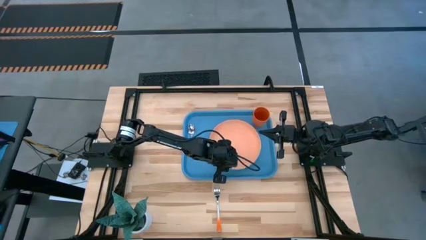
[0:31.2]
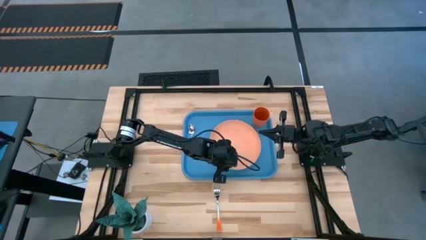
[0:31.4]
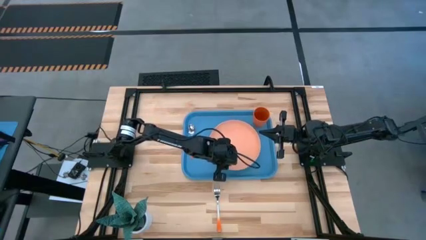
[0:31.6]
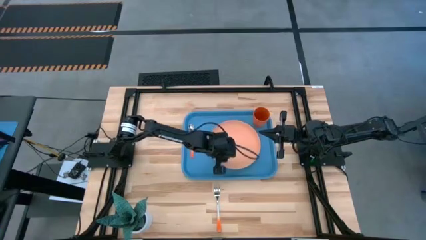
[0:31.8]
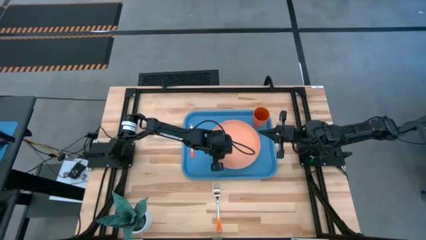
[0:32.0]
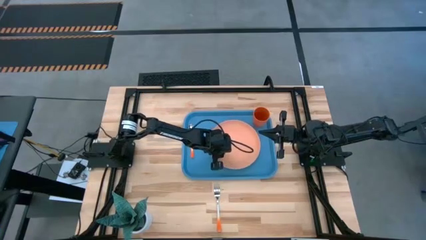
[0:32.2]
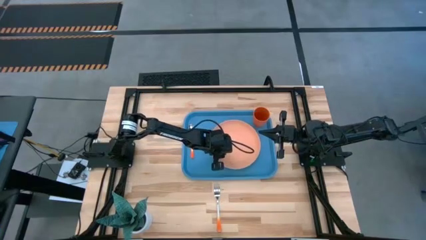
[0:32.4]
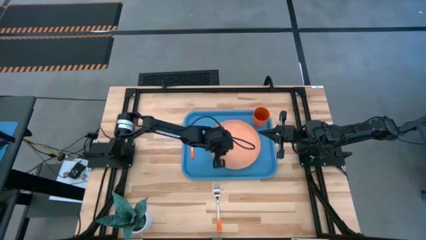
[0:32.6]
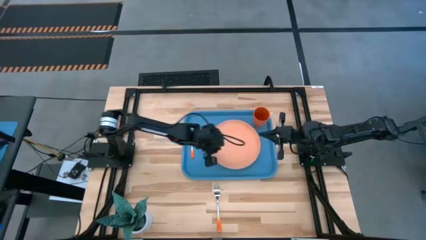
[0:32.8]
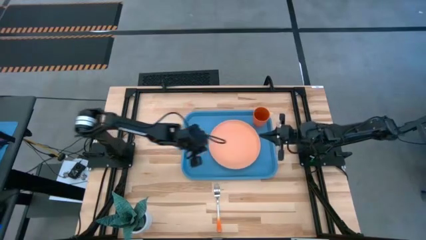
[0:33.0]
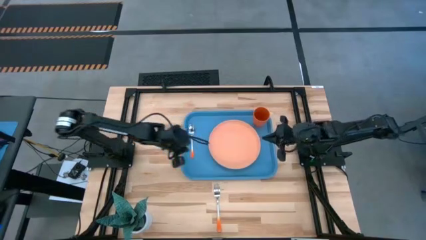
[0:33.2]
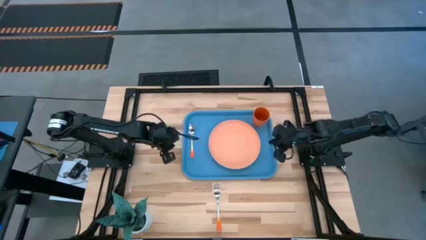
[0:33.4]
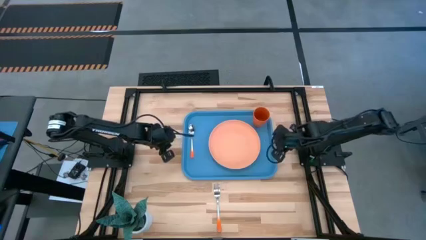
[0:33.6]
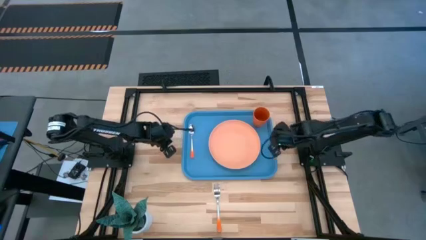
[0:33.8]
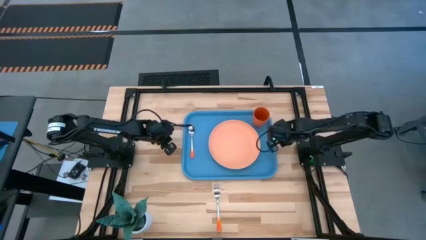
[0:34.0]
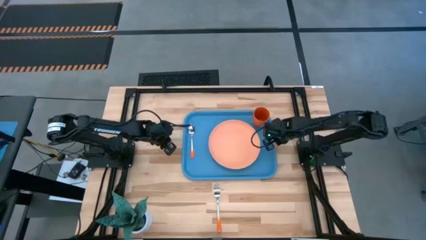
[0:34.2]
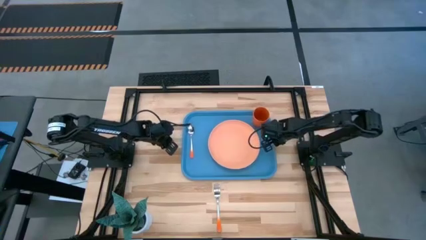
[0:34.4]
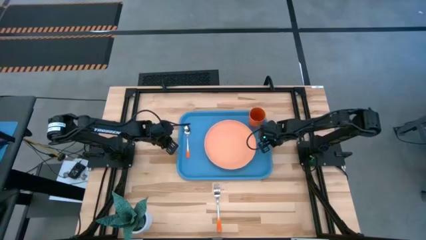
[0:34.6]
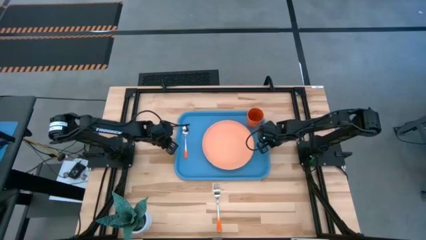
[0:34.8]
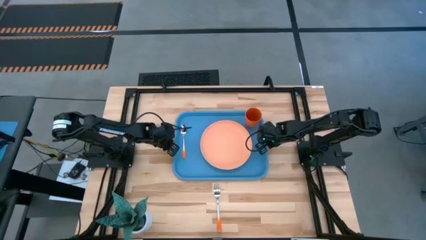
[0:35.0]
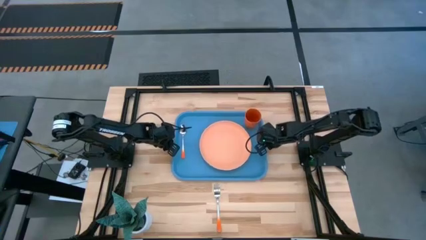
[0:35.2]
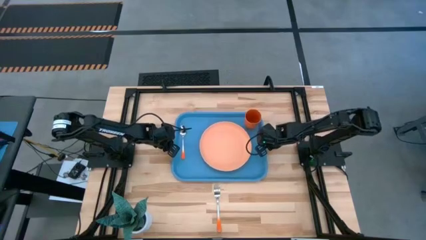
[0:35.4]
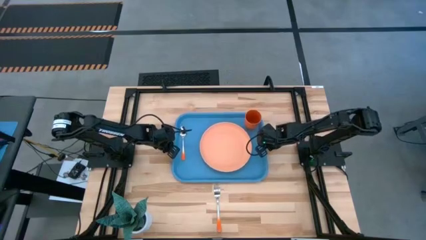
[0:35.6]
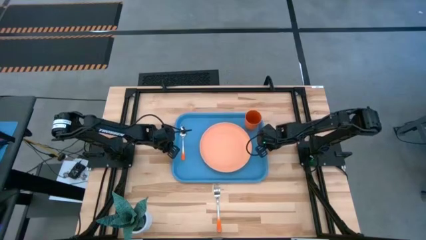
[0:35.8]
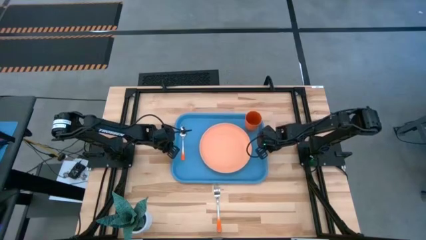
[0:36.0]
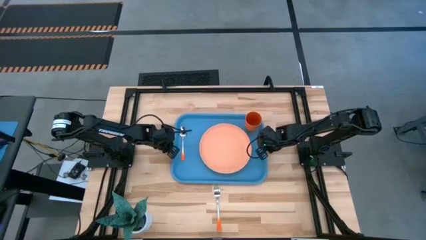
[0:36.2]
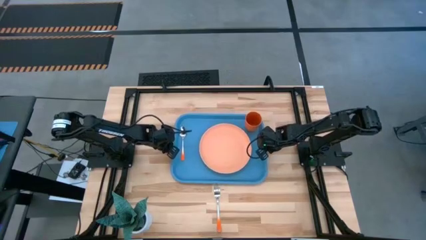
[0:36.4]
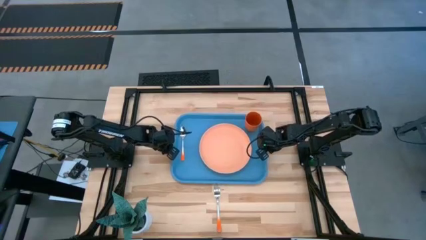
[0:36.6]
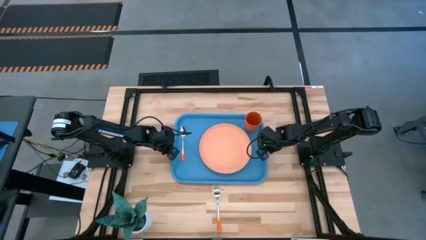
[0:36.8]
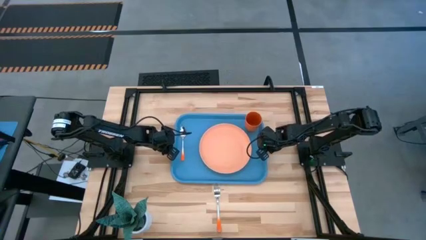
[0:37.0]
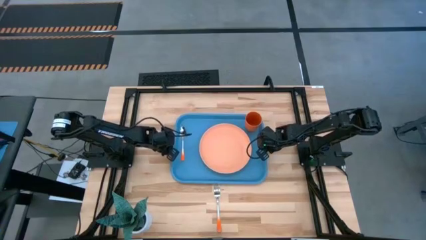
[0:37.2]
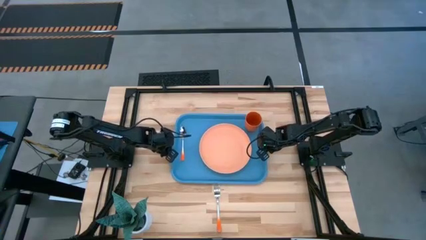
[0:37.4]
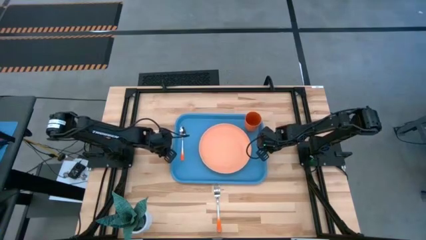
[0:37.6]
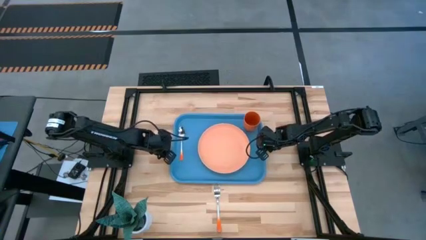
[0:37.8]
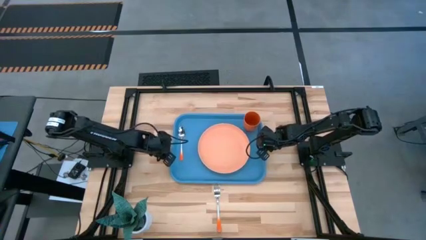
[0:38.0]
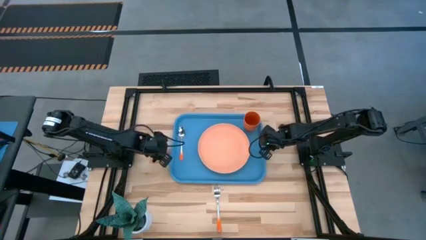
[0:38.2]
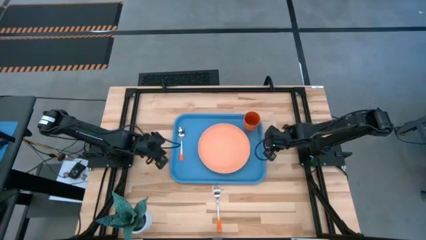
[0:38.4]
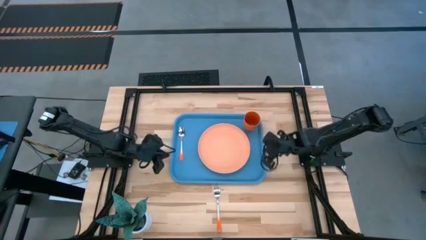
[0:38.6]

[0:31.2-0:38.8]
Task: Pick and place plate/cup/fork/spoon on tray
Adjust the blue tray to the middle of the table

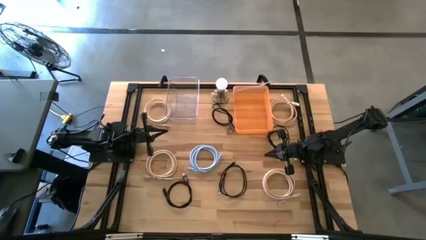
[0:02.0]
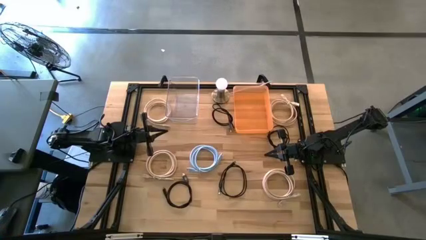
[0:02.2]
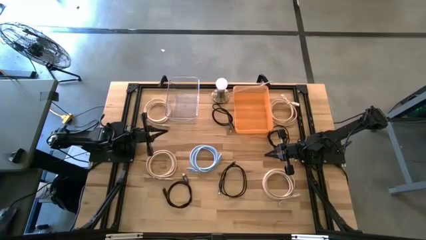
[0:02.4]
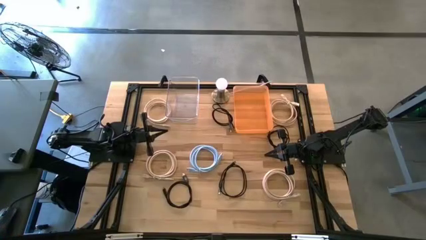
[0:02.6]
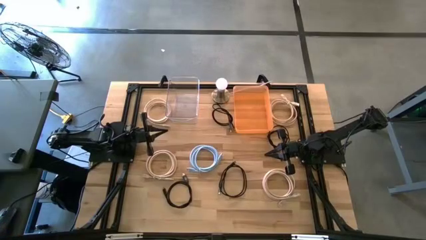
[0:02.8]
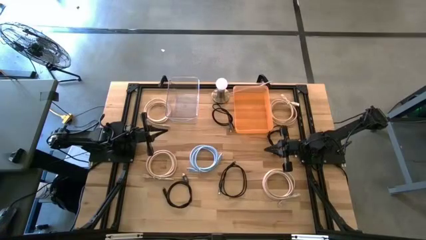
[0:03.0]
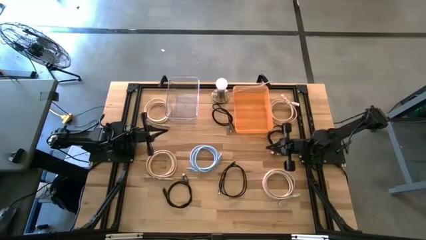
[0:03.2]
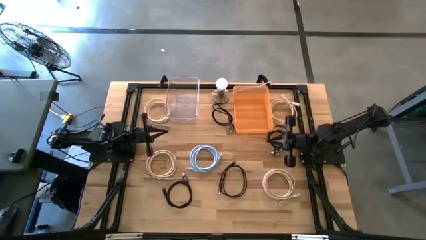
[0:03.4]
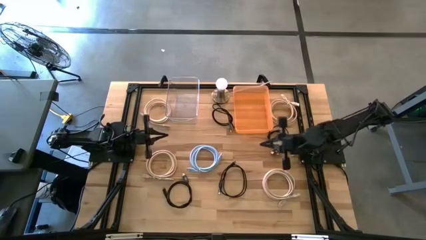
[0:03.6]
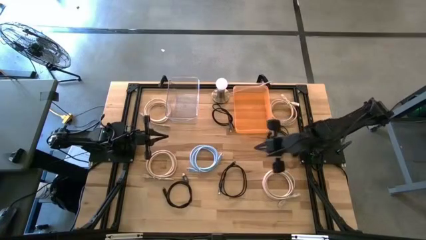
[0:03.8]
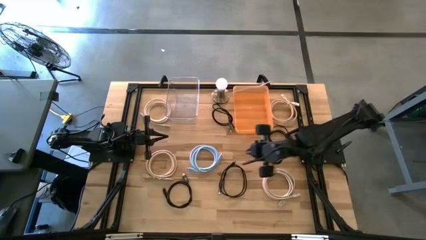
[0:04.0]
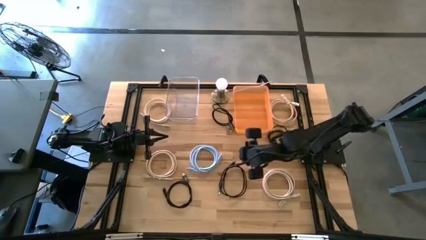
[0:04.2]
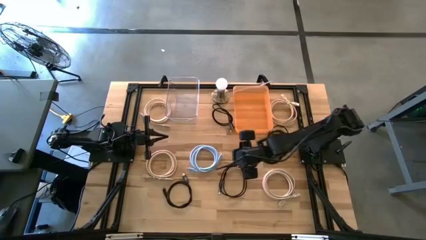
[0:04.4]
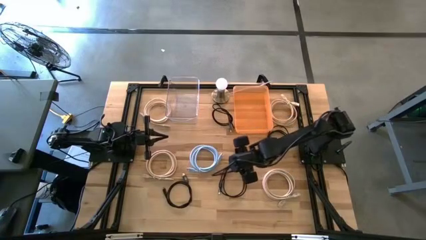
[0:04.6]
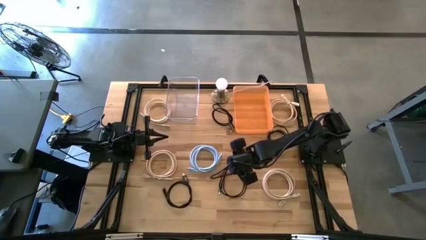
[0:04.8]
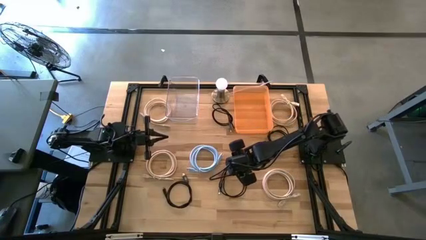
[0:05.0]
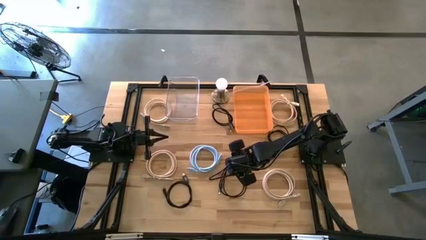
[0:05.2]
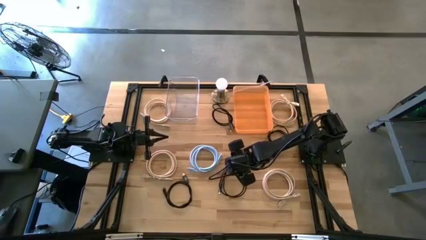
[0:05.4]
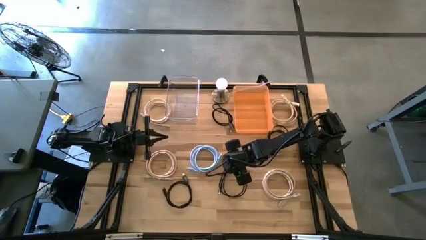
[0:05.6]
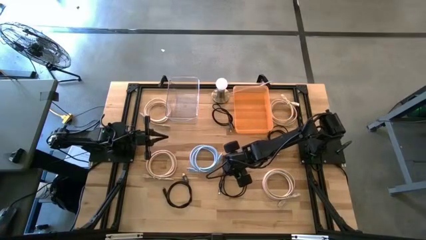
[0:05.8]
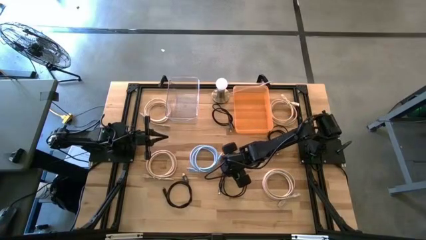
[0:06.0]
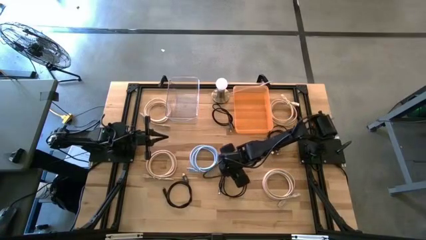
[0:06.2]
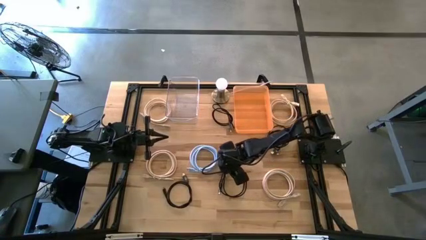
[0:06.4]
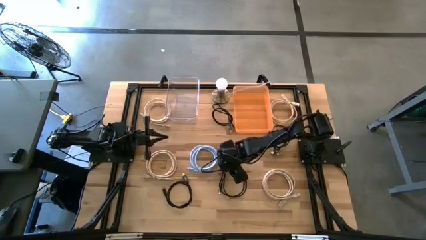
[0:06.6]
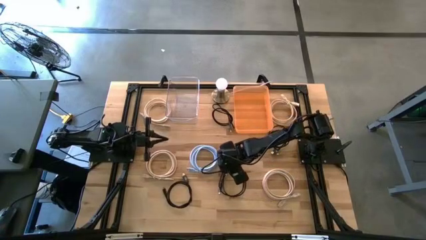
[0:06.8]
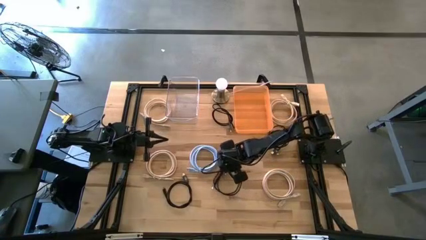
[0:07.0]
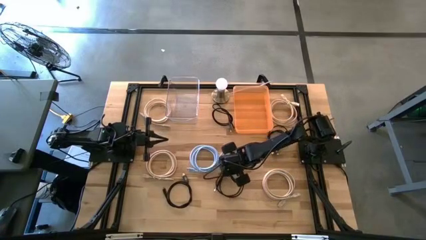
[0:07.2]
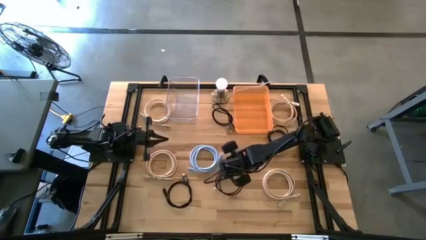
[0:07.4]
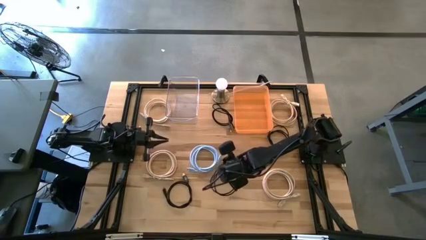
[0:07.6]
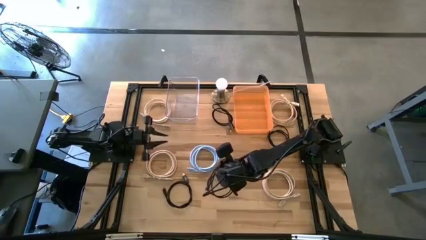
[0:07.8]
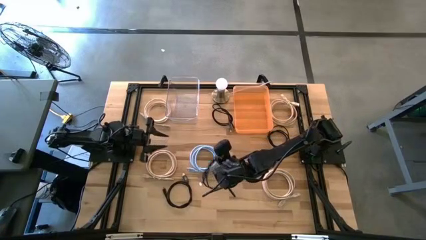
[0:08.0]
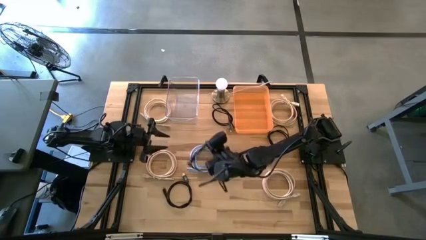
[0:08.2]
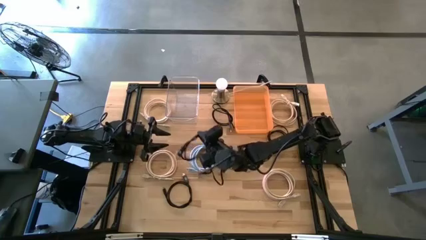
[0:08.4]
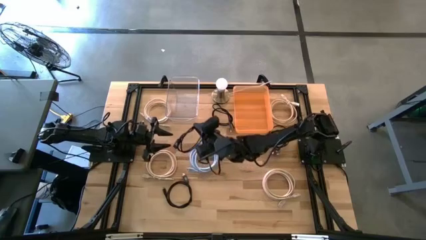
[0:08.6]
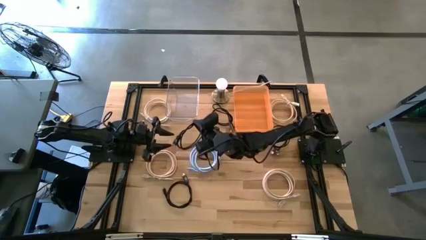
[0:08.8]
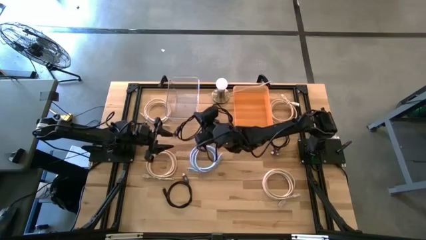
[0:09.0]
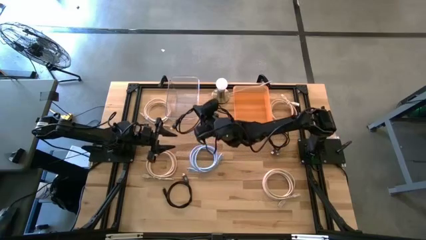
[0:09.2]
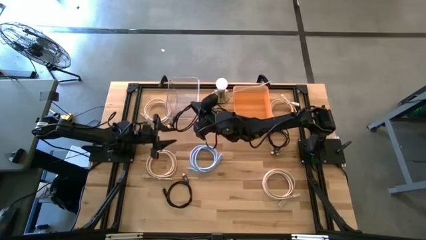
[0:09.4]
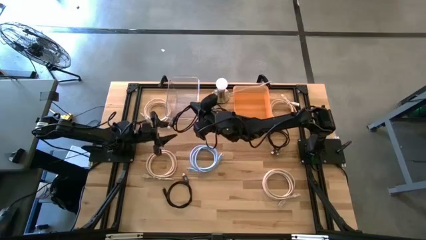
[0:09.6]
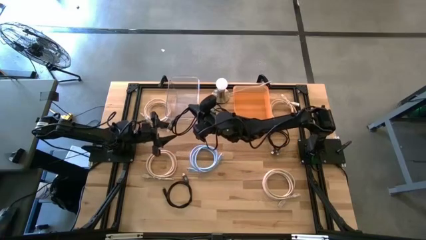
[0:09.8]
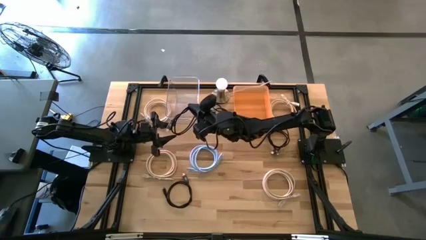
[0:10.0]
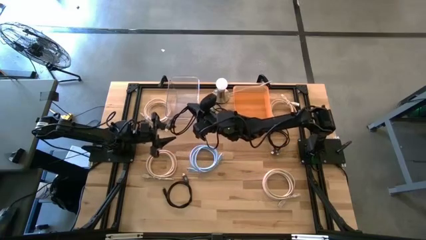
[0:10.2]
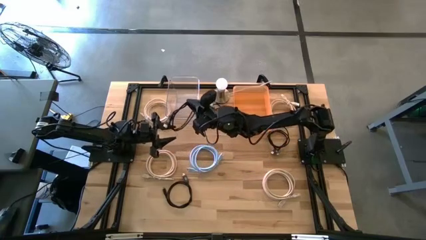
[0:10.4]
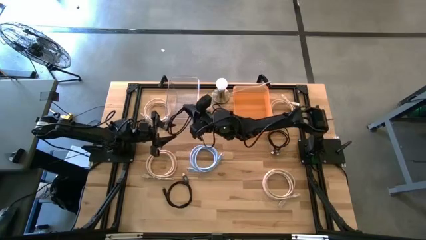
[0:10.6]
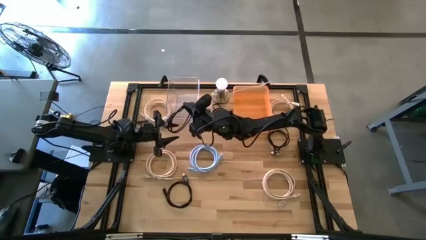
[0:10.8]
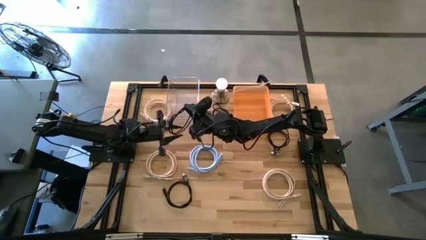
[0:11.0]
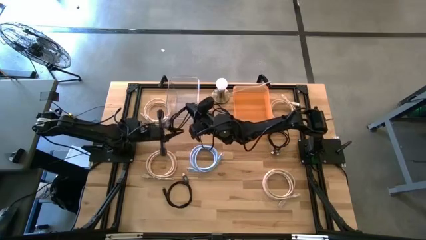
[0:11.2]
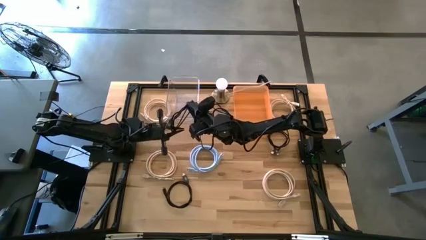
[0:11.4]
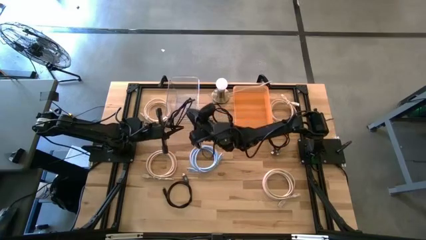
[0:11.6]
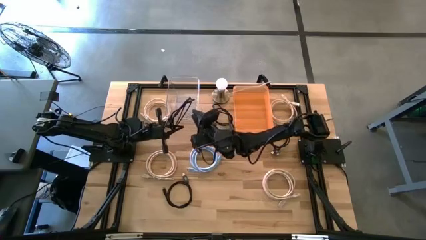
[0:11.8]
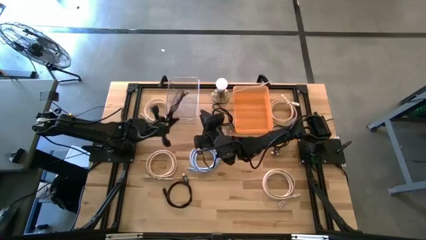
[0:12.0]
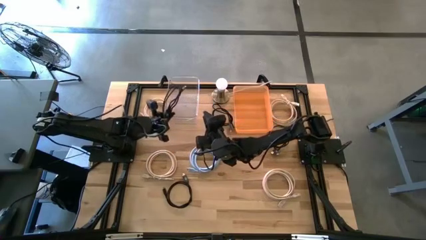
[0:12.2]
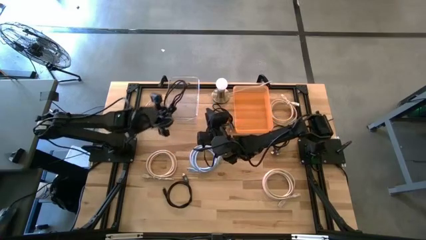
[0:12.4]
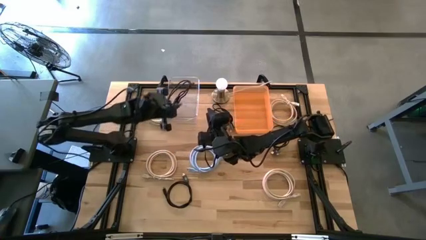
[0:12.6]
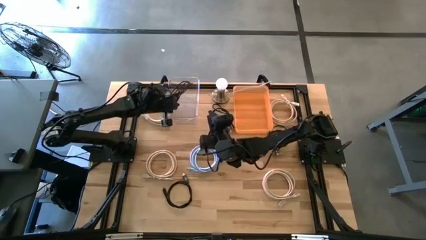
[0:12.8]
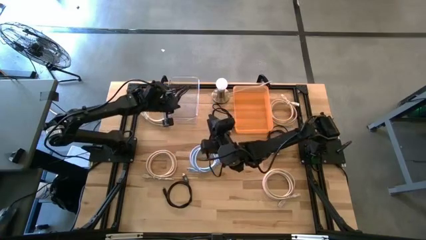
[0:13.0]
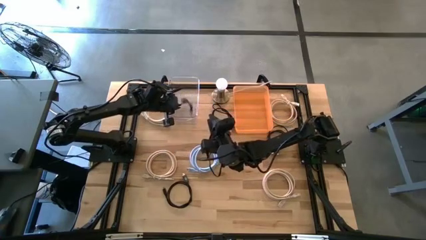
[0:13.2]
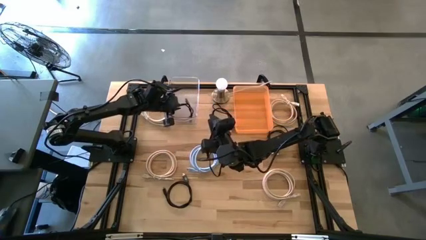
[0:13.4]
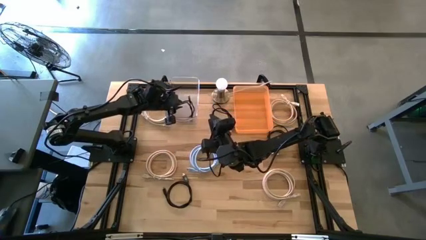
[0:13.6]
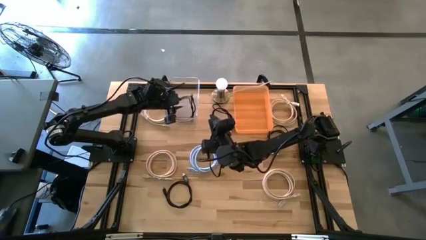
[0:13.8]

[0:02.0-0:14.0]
Task: Pick & Place USB Port
Put the black charger cable into the transparent bin
